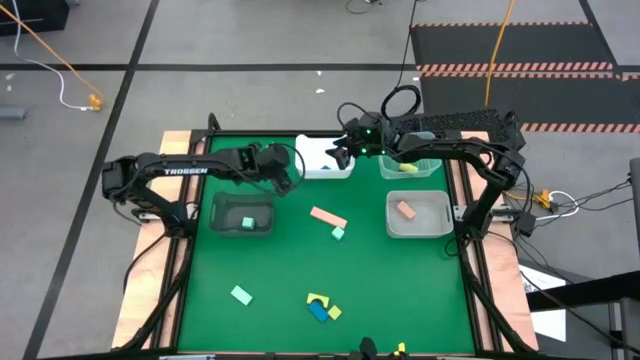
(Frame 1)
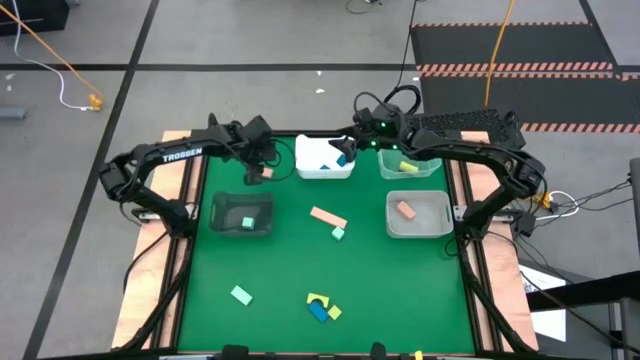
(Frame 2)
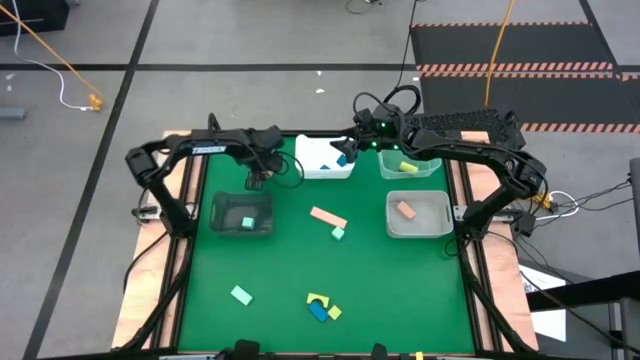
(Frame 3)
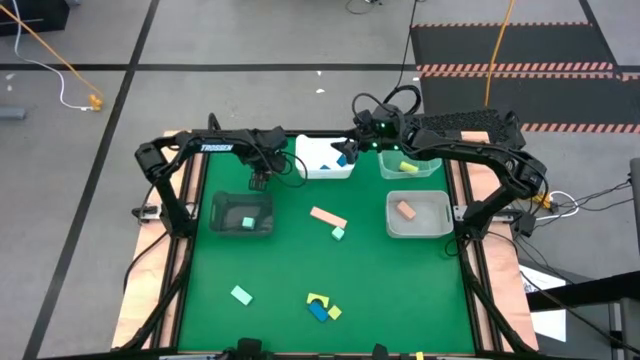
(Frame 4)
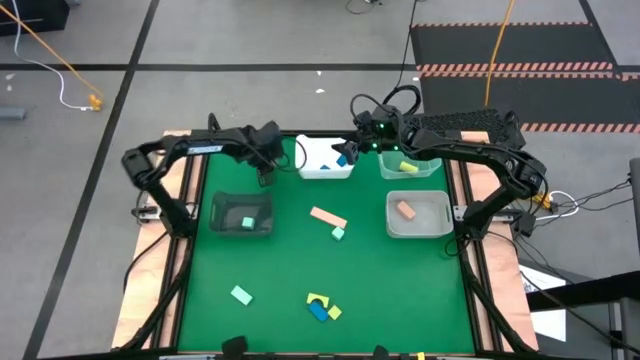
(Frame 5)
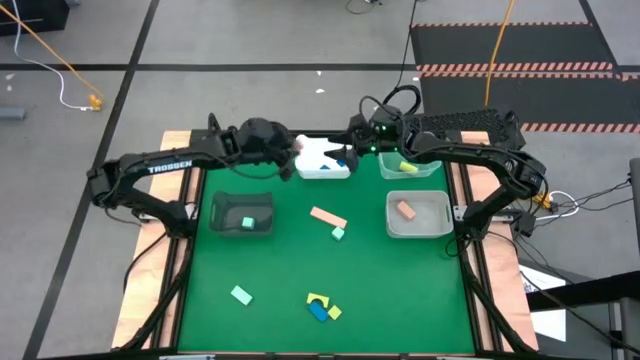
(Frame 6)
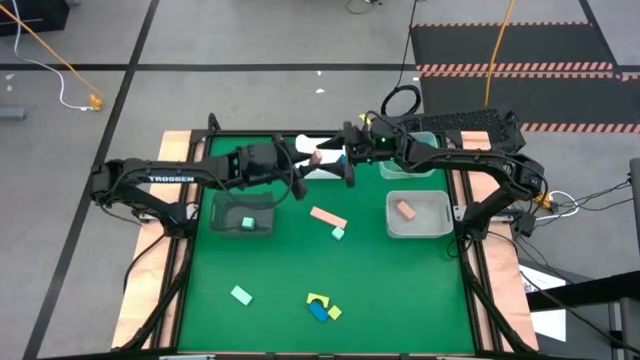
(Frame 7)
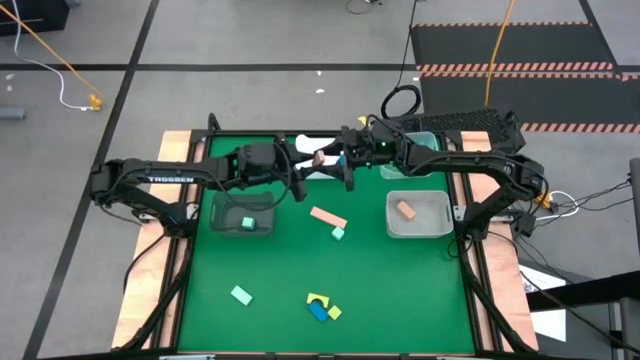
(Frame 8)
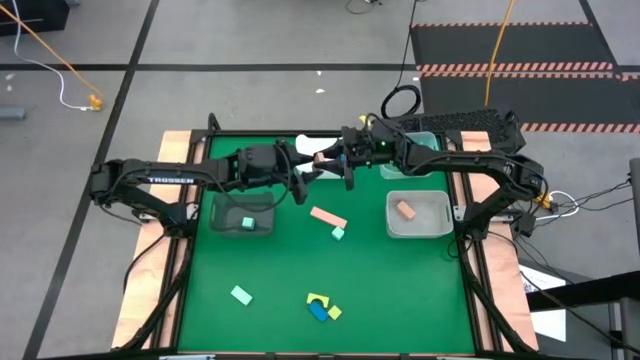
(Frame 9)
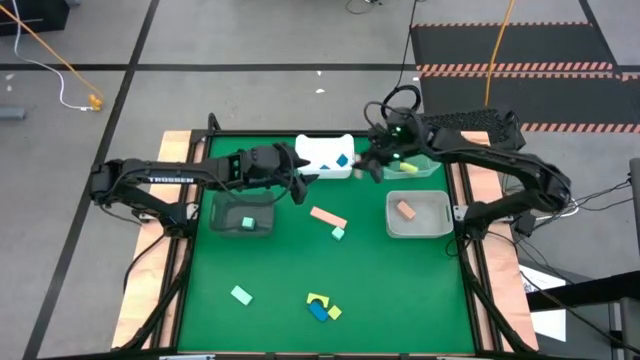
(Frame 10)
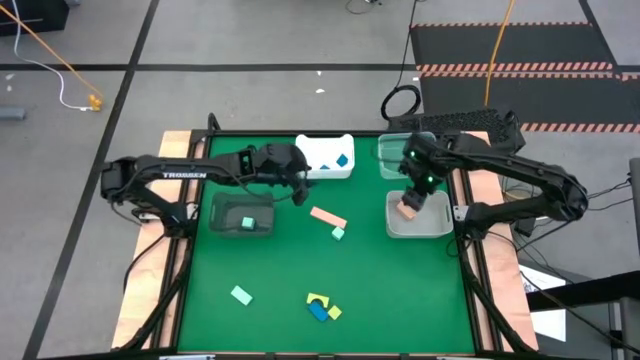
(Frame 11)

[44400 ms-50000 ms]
Task: Sort & place blocks by color
Put the top brown block into the gray bin

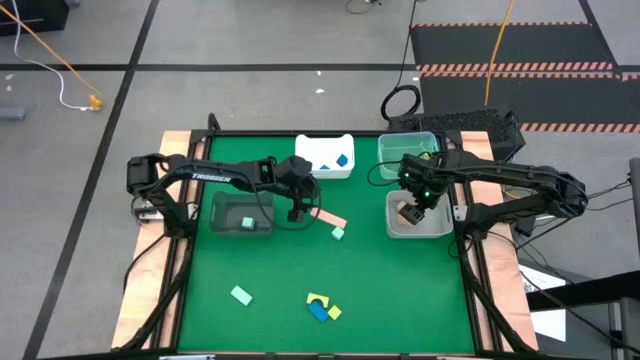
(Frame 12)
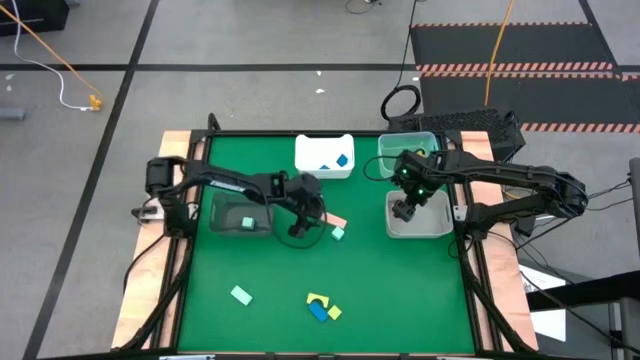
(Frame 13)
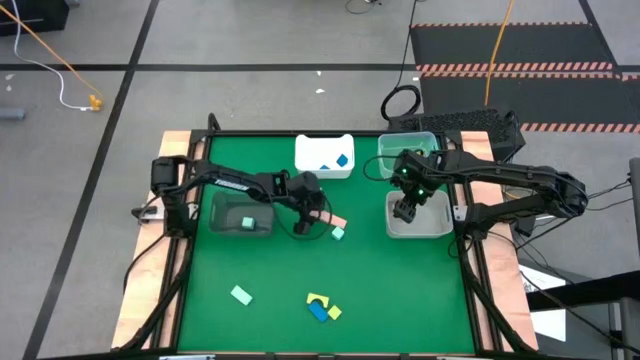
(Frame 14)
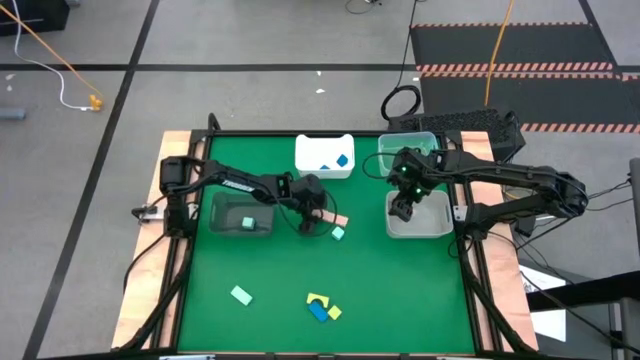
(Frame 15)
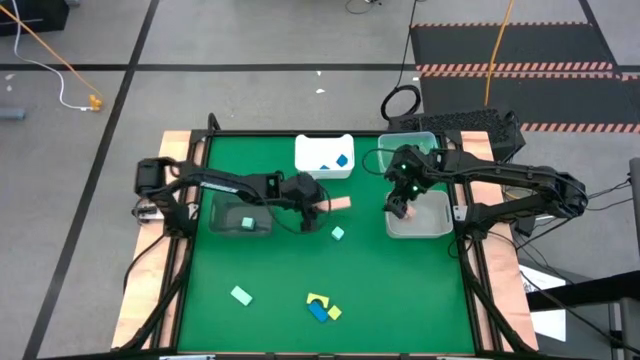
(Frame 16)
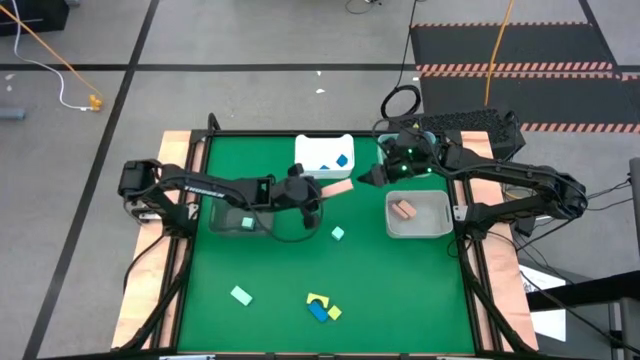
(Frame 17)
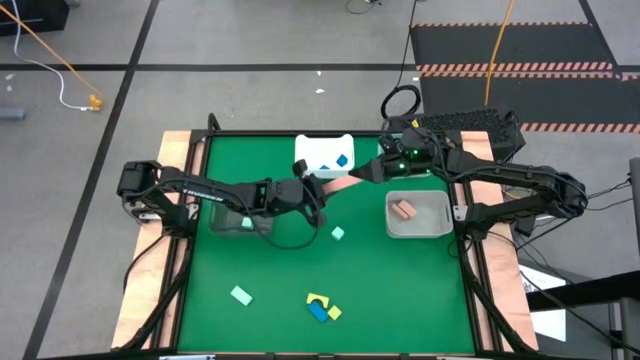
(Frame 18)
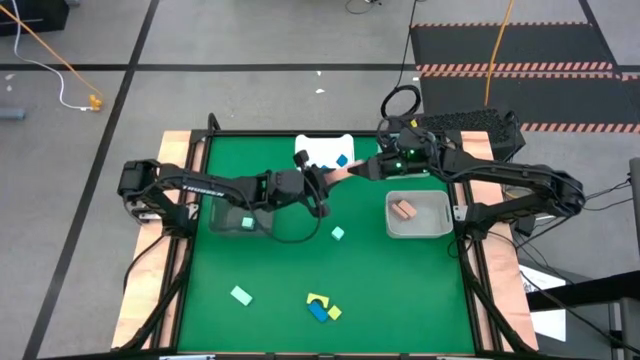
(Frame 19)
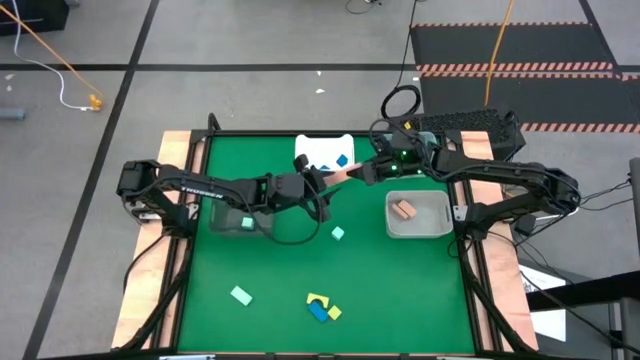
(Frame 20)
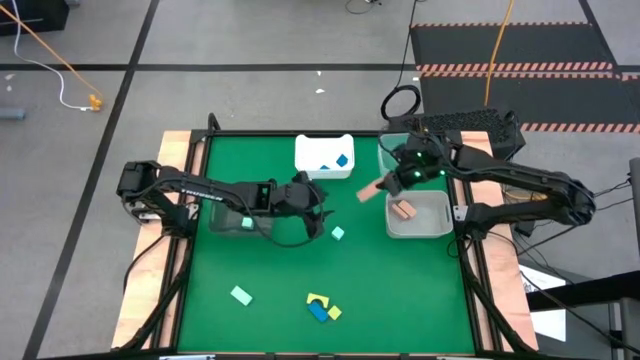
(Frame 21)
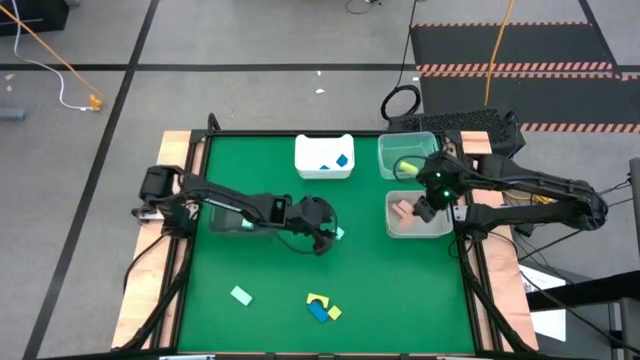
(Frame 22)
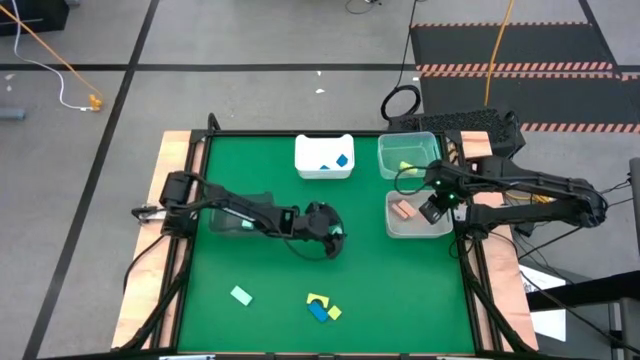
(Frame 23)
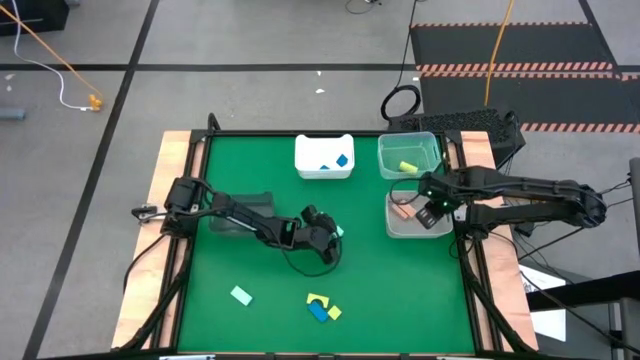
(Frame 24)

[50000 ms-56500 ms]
Put the brown block into the gray bin

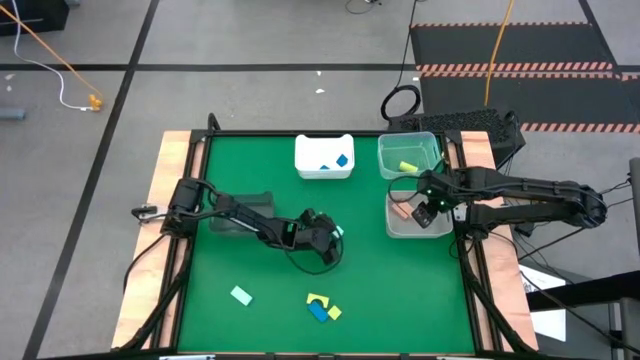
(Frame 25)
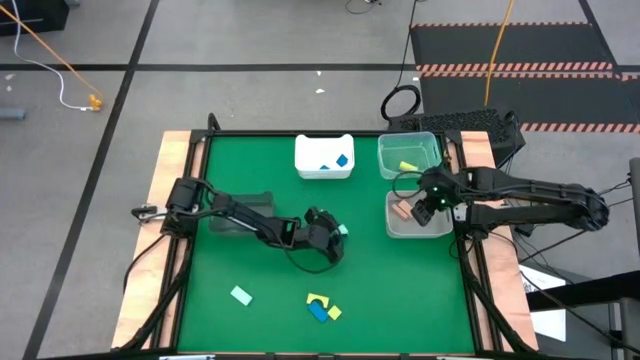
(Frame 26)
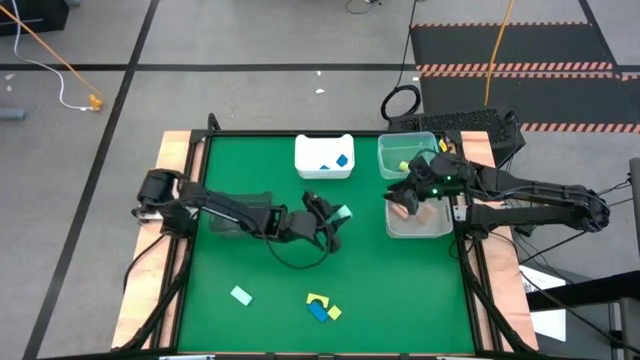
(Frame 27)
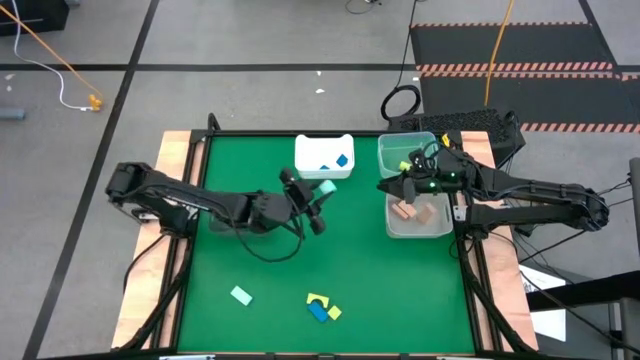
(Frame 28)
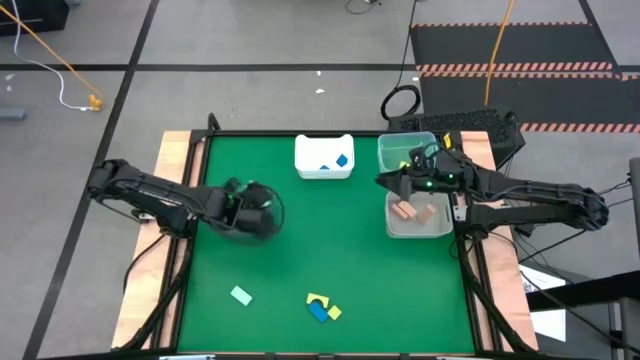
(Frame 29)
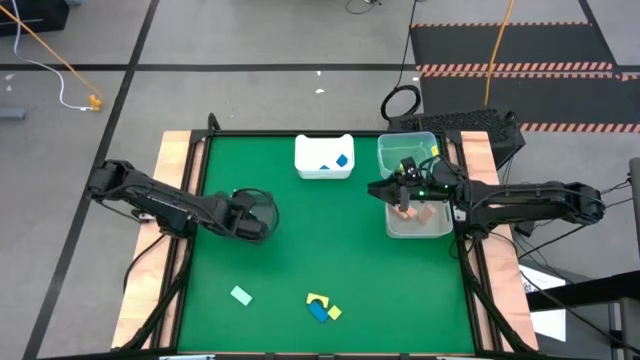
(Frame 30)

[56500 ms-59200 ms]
Put the top light blue block into the black bin

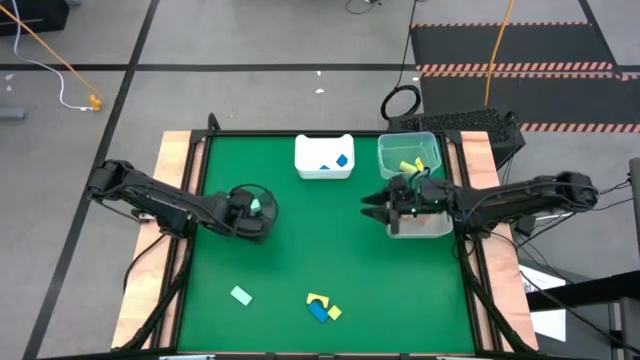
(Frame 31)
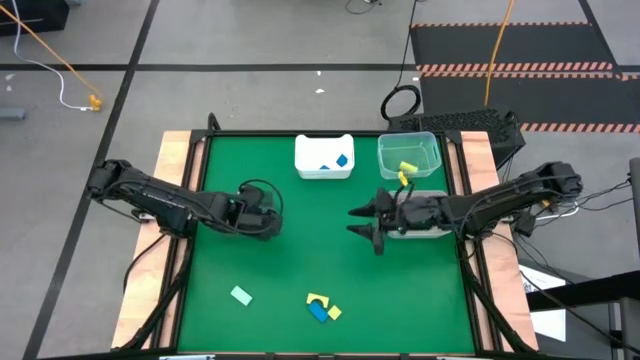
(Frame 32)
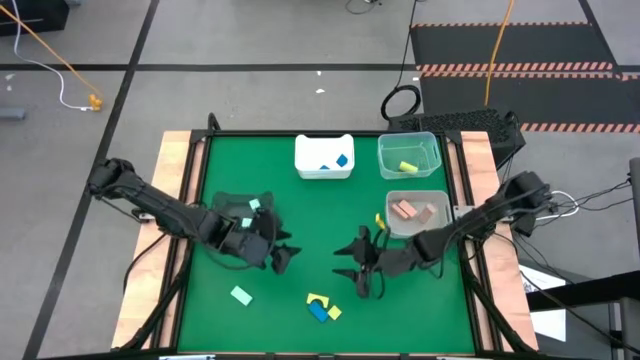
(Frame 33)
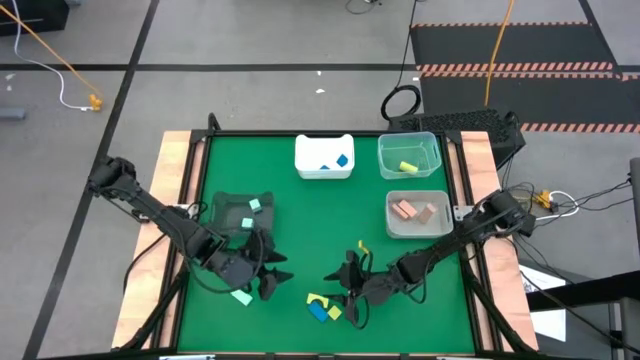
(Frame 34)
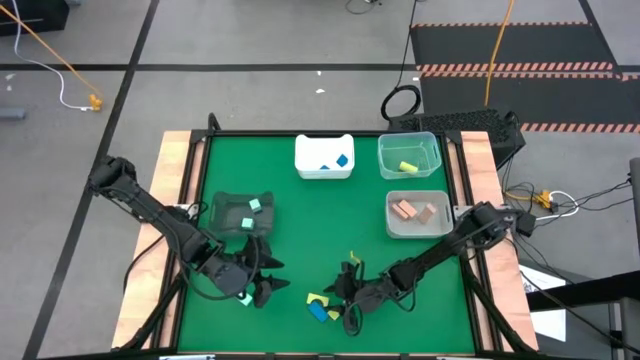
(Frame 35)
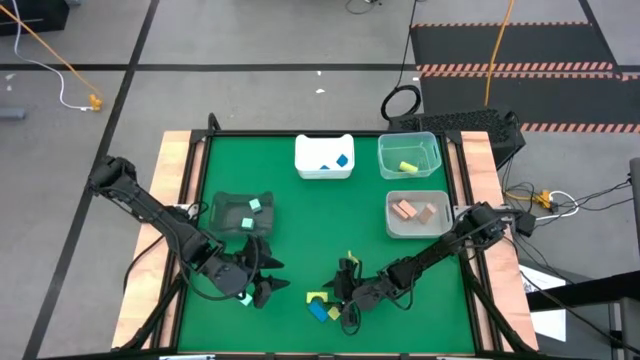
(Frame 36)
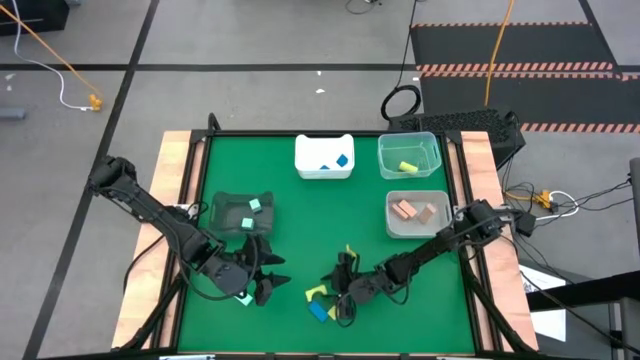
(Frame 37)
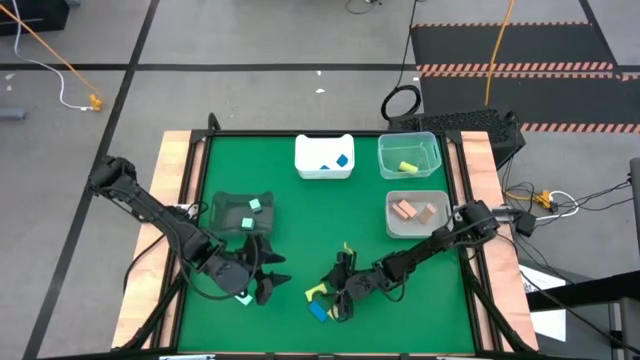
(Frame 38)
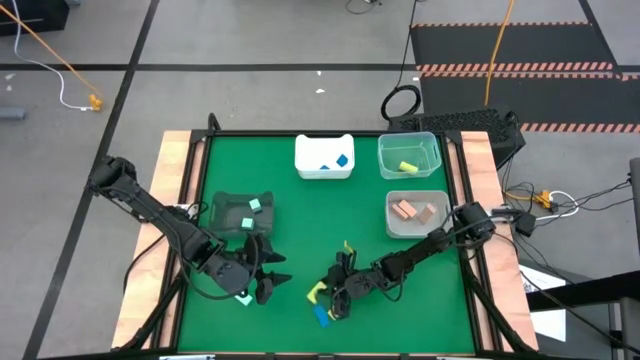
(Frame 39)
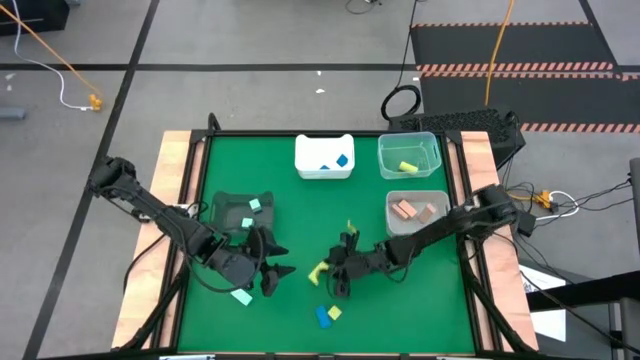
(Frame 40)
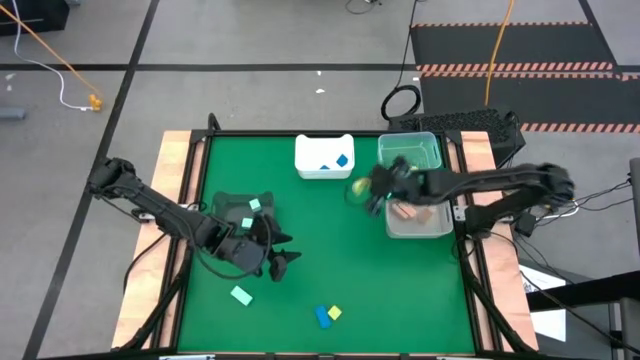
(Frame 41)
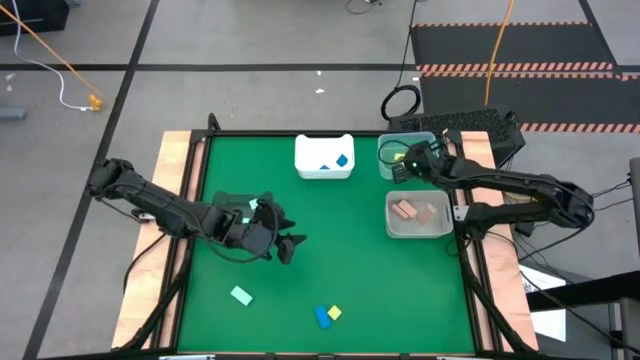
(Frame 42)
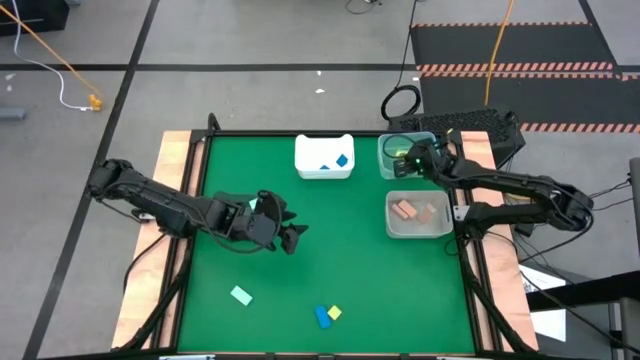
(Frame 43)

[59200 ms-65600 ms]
Put the top green block into the transparent bin
